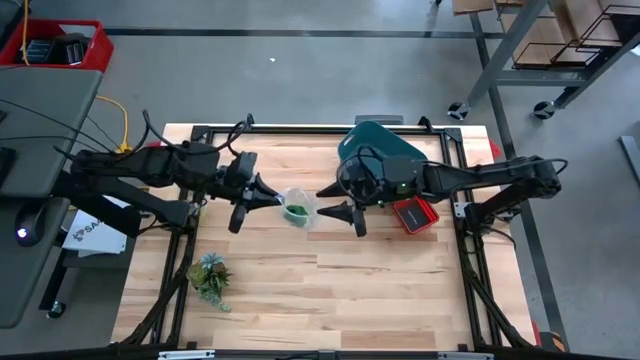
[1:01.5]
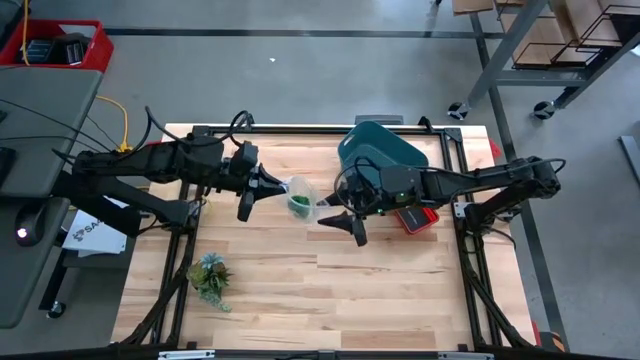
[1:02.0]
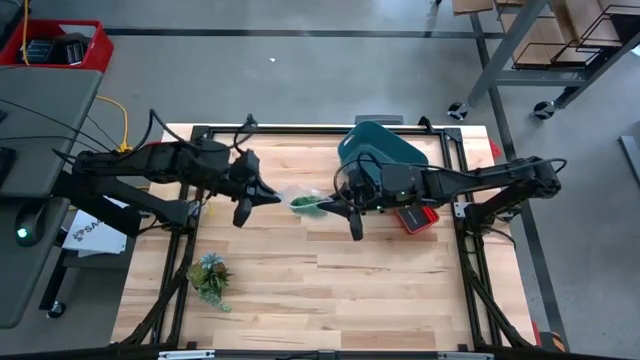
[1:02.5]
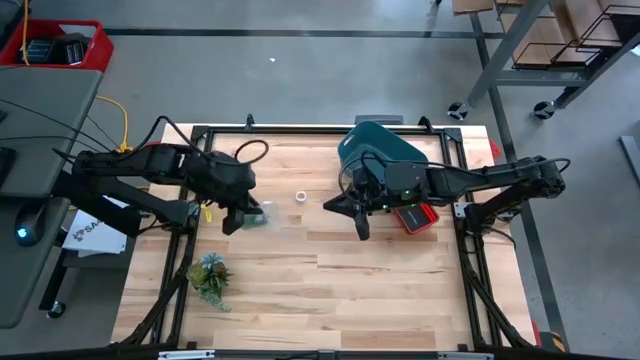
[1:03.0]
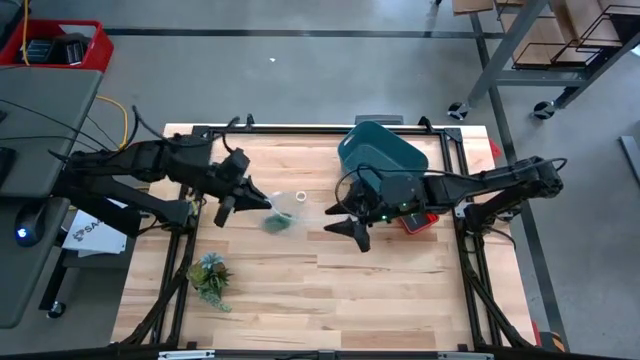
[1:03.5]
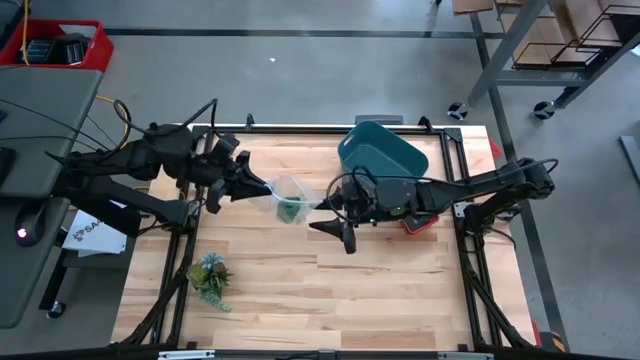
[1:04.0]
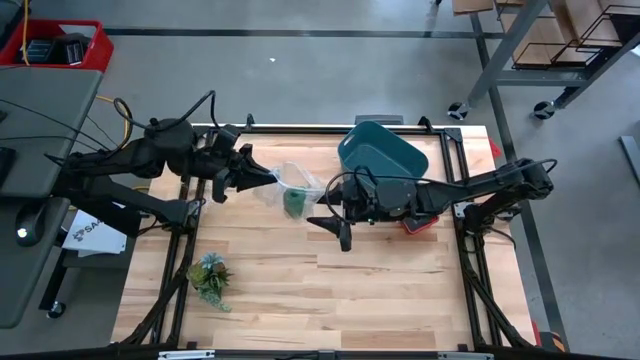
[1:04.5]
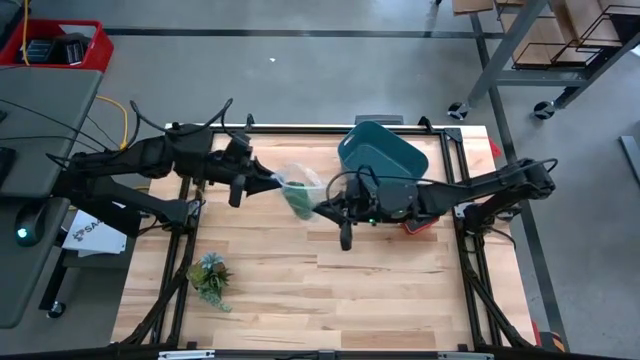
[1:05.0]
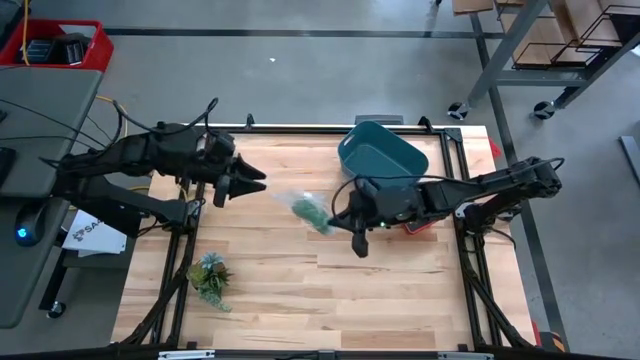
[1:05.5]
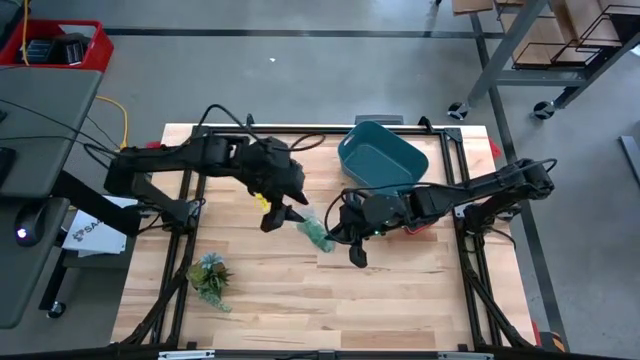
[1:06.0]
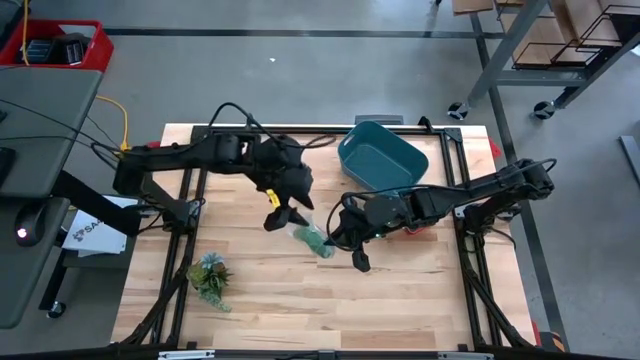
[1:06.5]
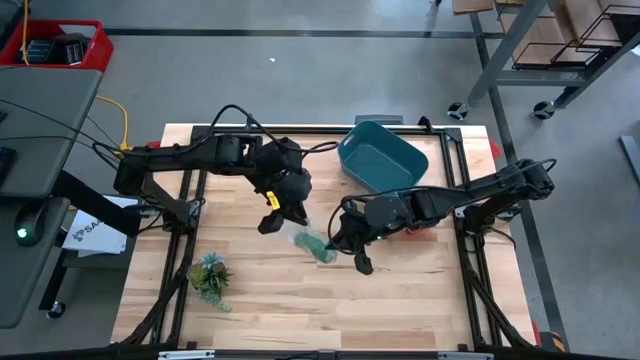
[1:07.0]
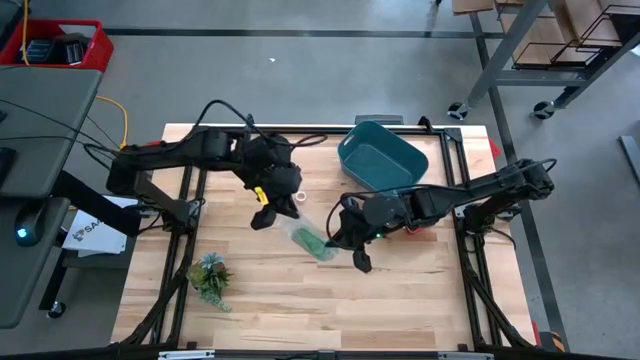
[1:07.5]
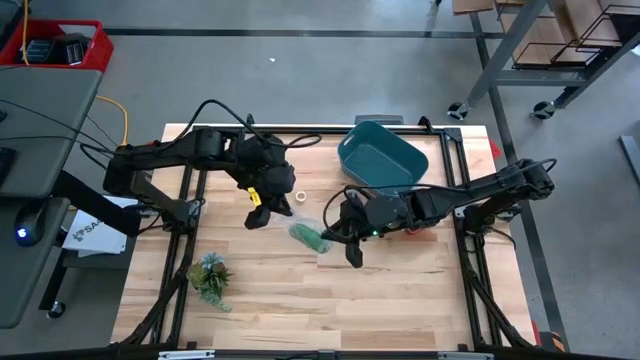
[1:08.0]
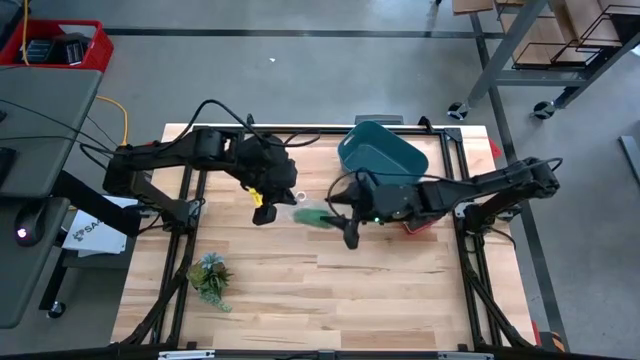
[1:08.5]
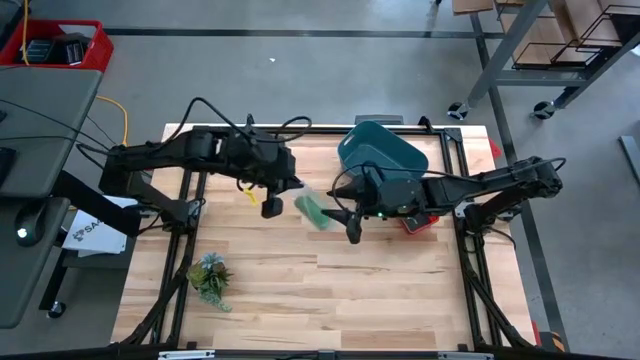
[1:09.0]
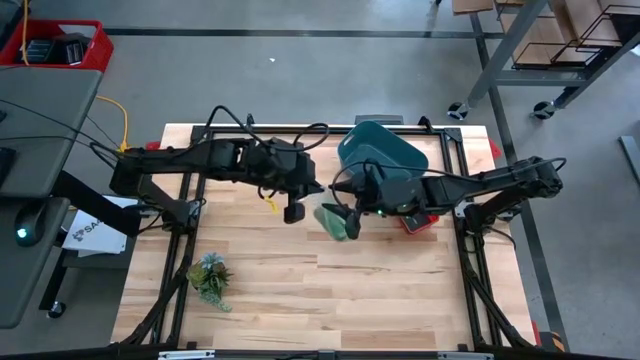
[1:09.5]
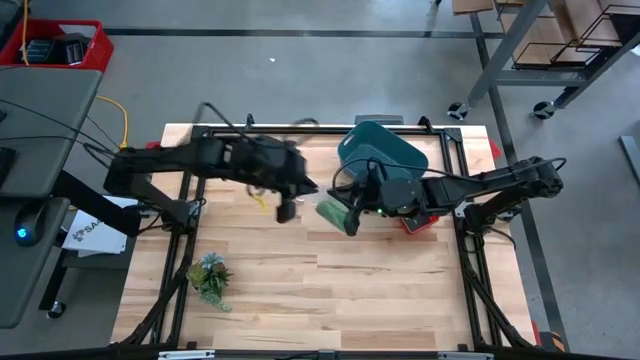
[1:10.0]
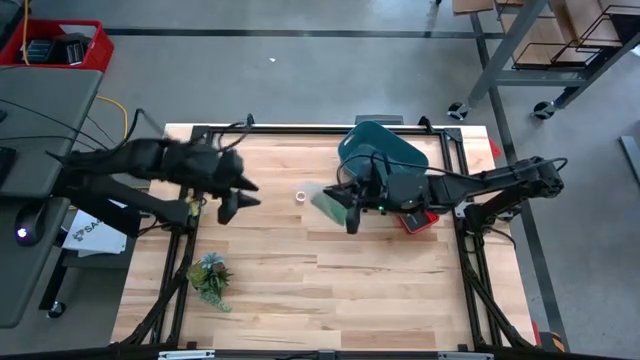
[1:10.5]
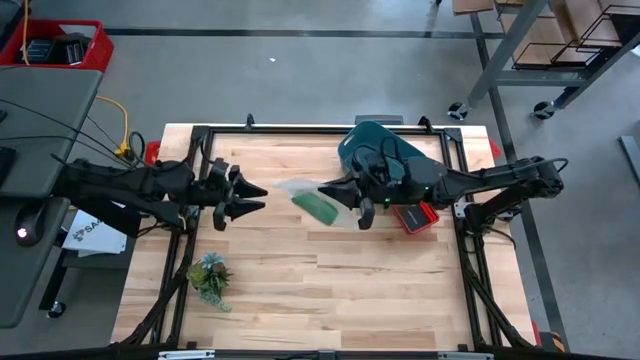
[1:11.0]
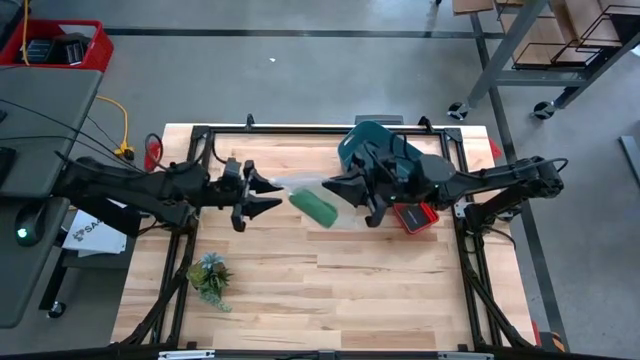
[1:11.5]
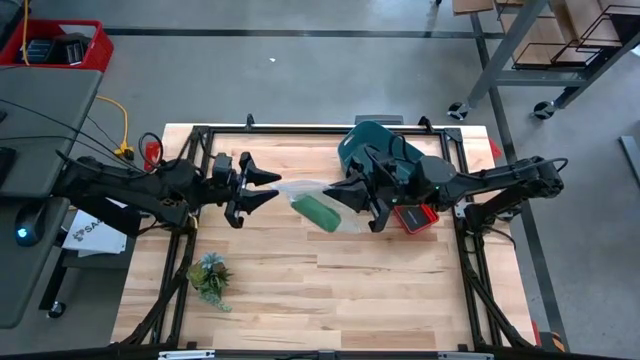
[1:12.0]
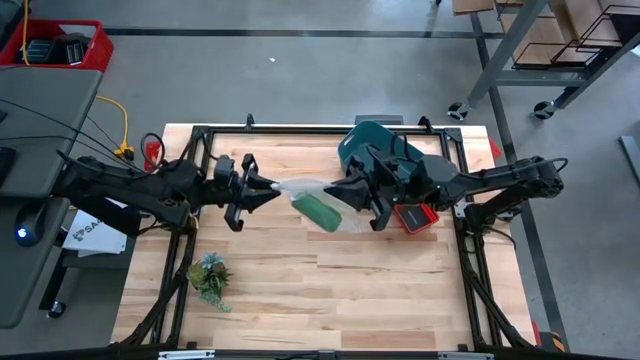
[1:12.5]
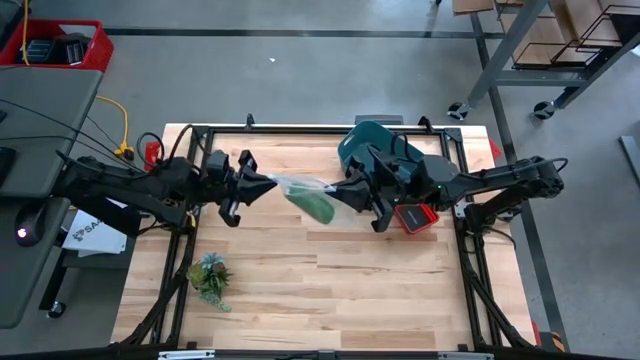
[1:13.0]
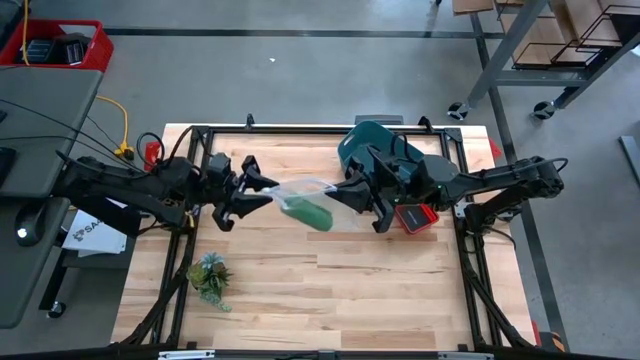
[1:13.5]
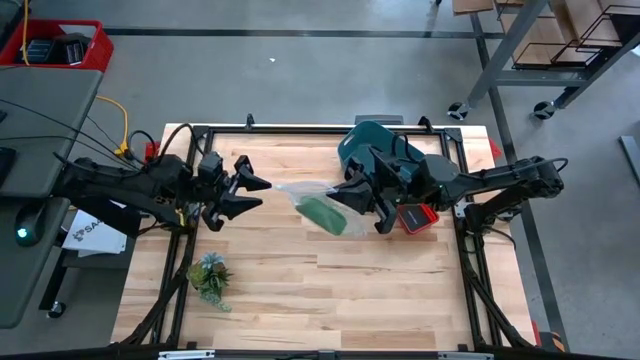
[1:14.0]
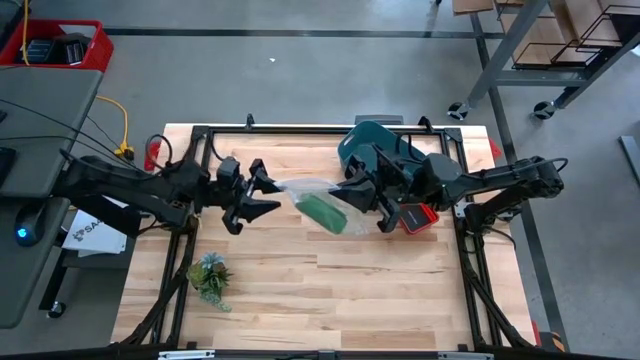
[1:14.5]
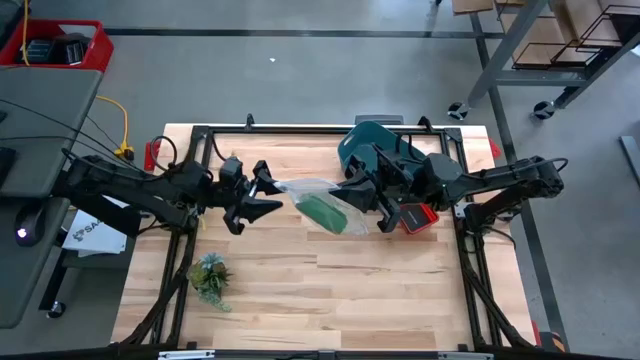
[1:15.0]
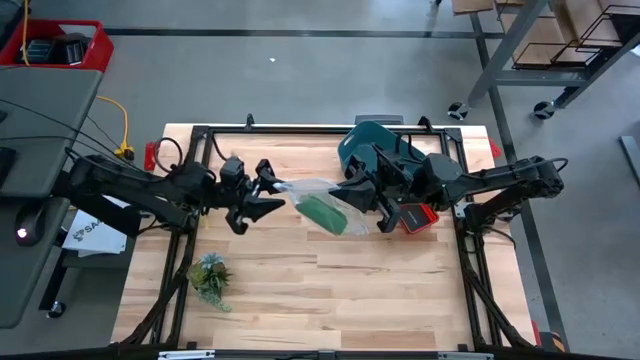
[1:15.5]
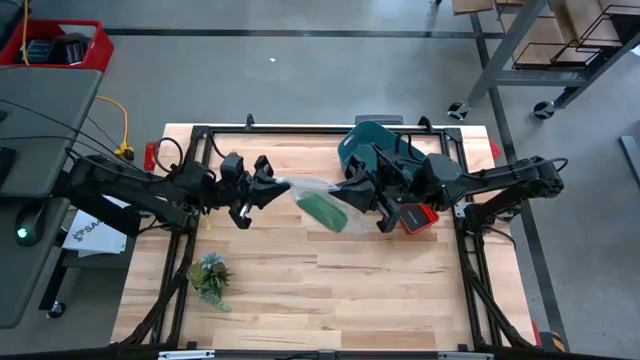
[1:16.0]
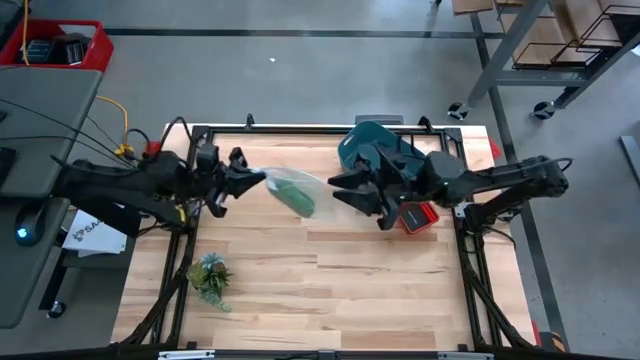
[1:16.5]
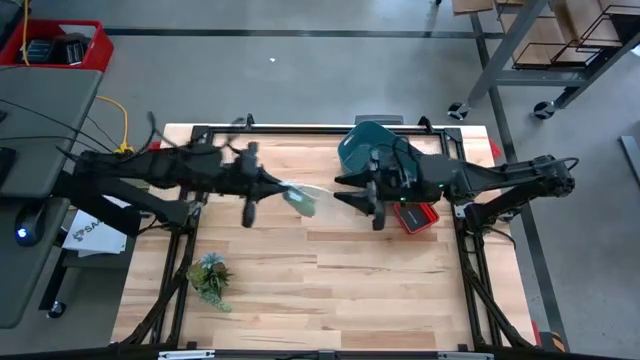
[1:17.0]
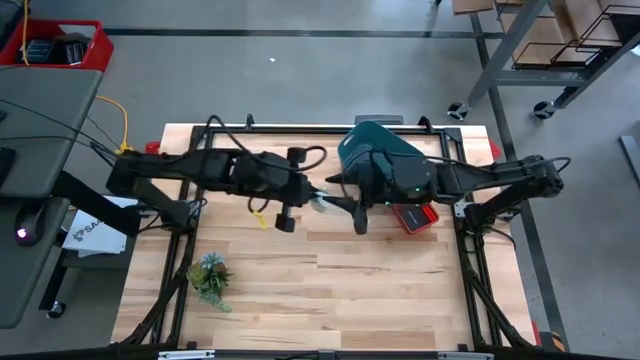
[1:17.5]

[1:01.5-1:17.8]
Task: Roll bandage
Close the transparent zip bag

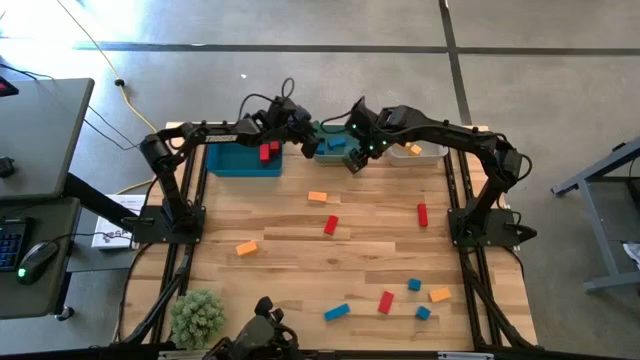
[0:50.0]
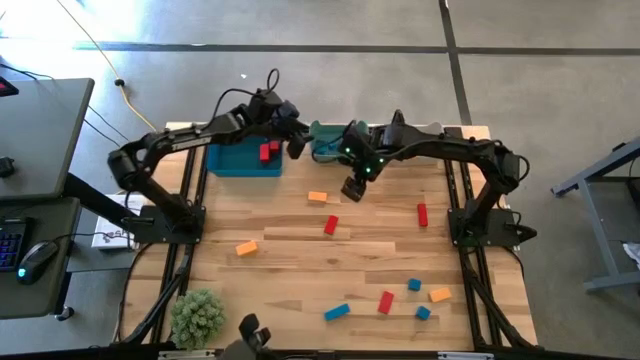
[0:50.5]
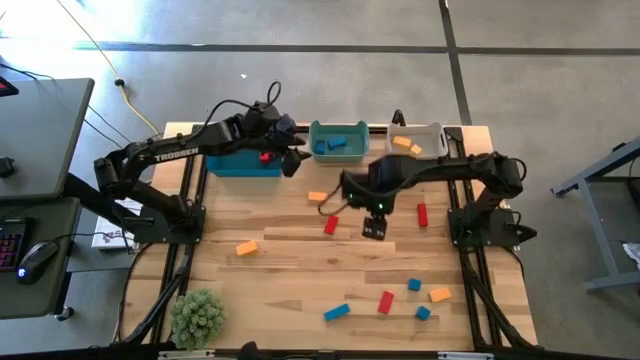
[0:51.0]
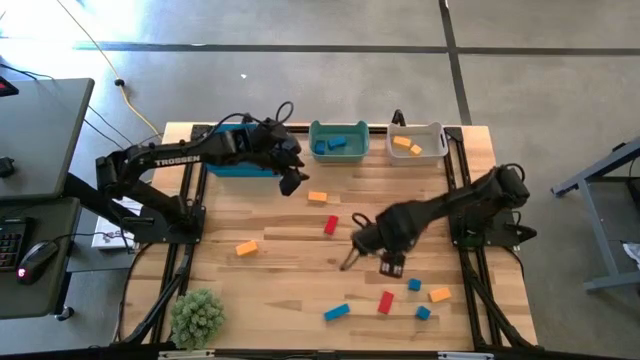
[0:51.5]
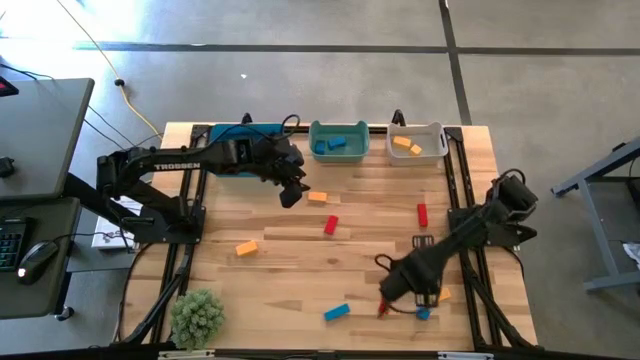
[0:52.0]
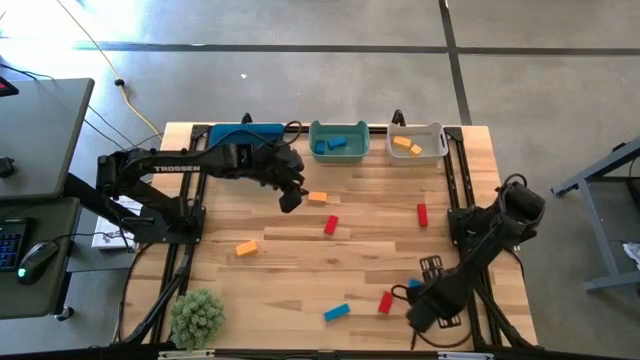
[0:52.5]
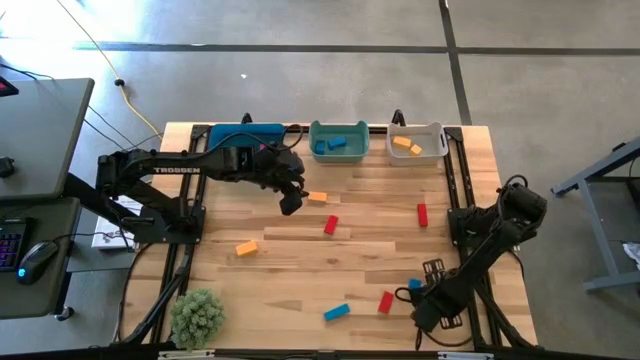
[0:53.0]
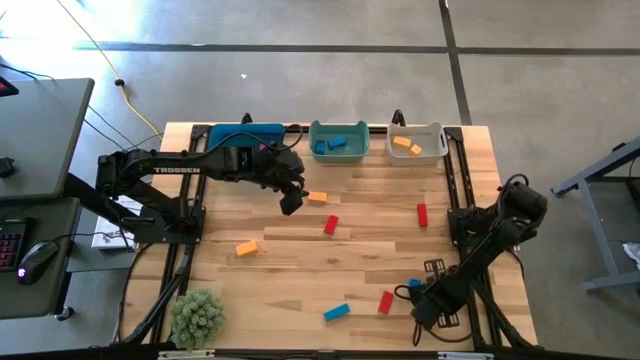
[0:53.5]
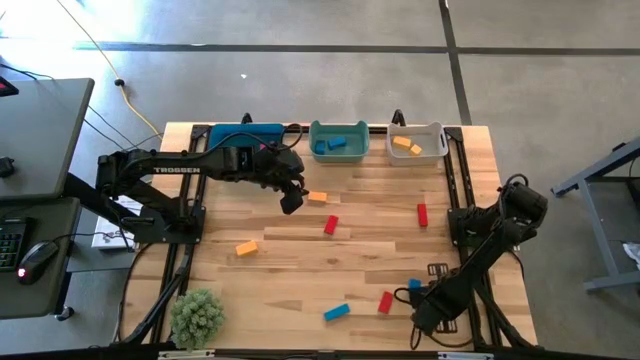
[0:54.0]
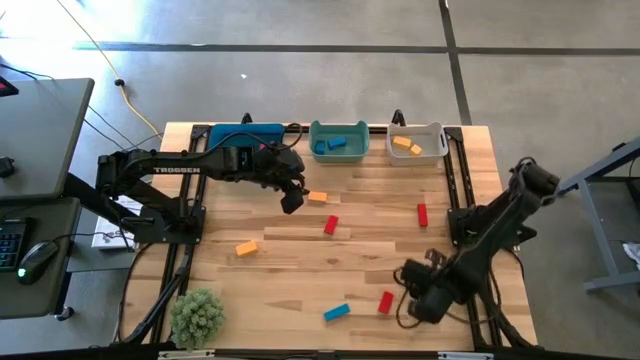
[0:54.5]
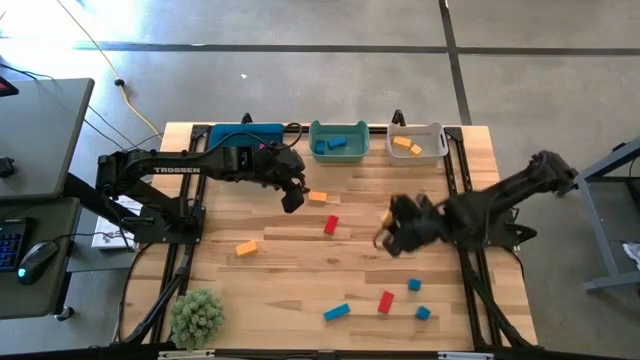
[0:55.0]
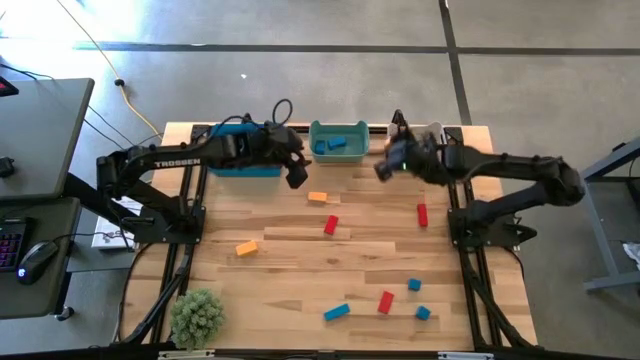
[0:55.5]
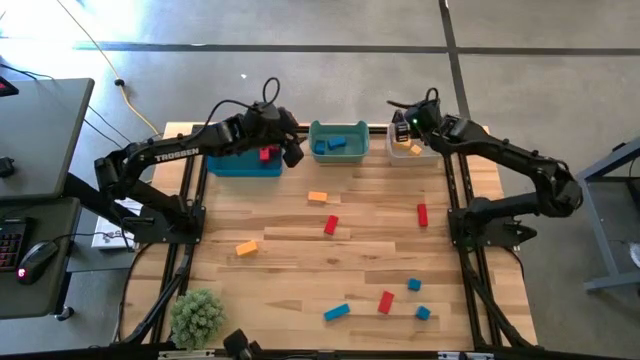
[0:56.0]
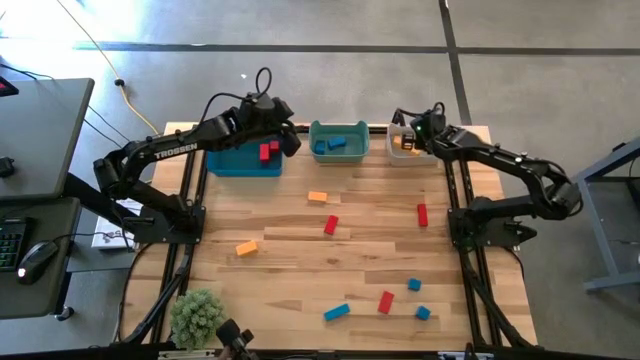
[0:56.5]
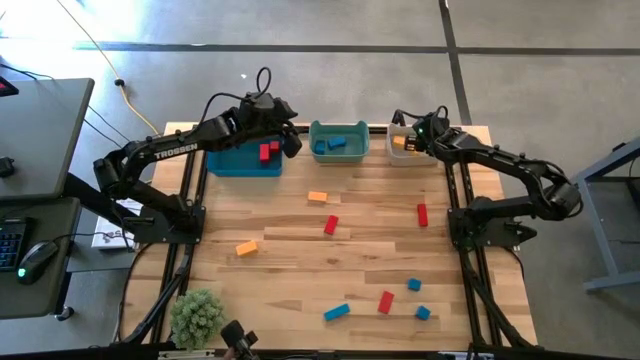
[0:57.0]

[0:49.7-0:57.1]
Task: Sort & place blocks by color
Put the yellow block into the gray bin
